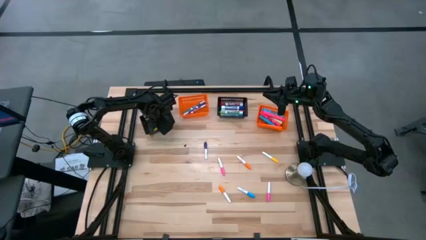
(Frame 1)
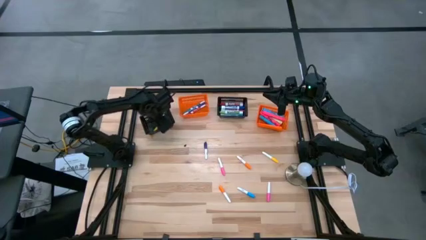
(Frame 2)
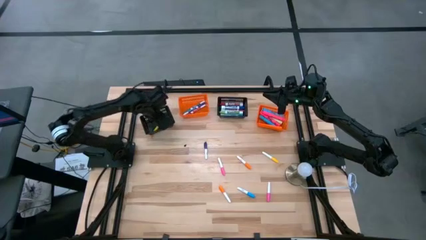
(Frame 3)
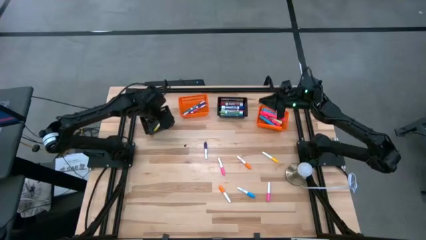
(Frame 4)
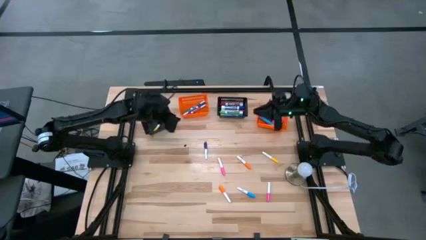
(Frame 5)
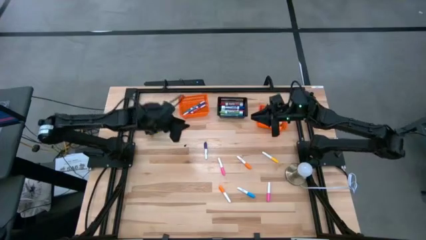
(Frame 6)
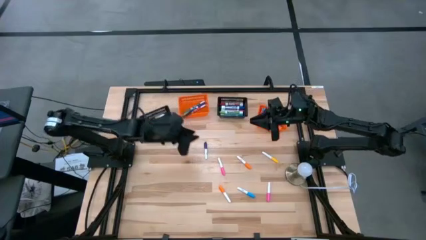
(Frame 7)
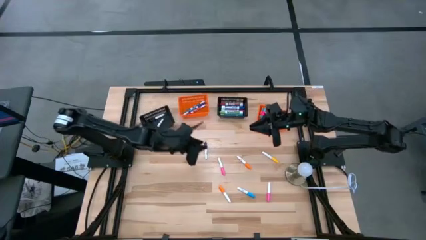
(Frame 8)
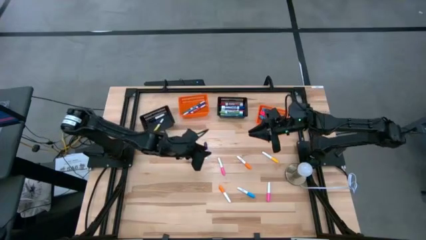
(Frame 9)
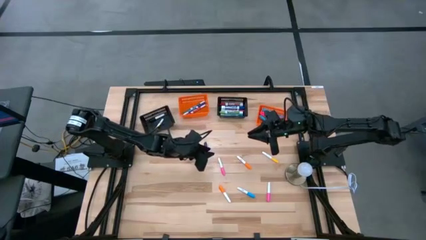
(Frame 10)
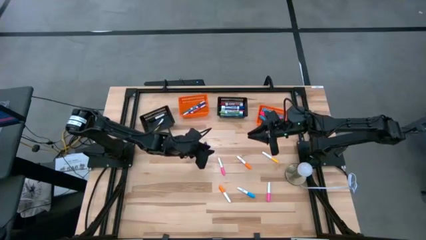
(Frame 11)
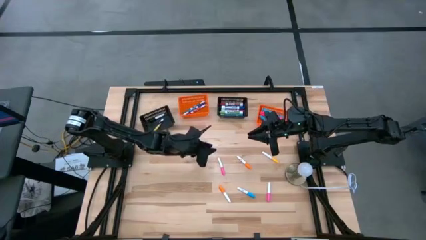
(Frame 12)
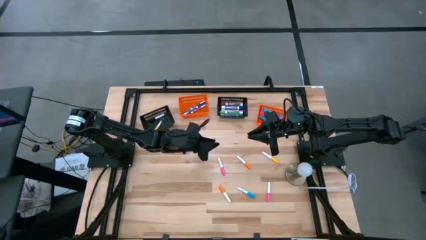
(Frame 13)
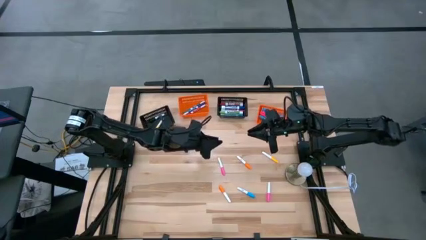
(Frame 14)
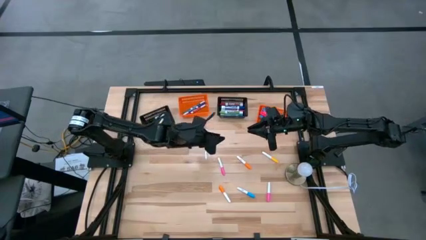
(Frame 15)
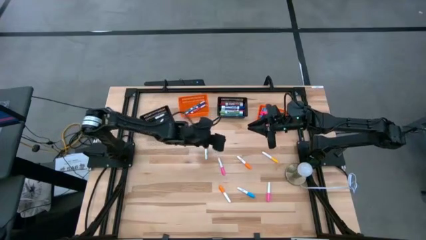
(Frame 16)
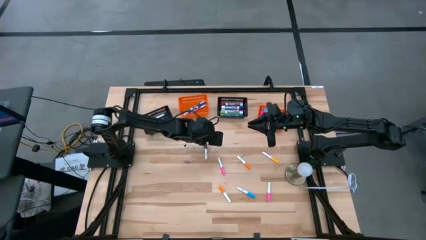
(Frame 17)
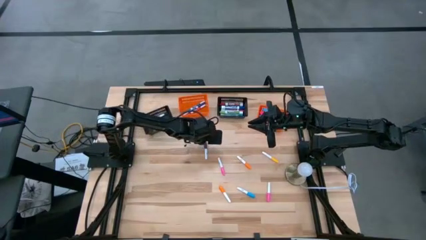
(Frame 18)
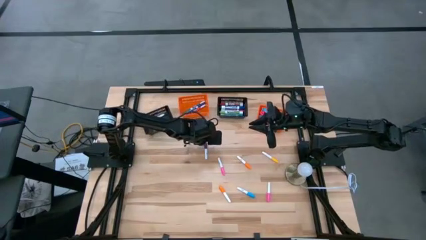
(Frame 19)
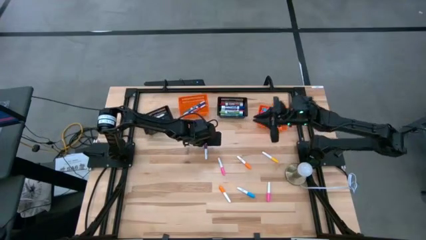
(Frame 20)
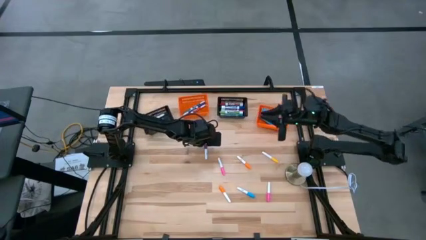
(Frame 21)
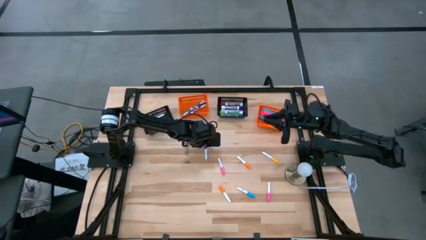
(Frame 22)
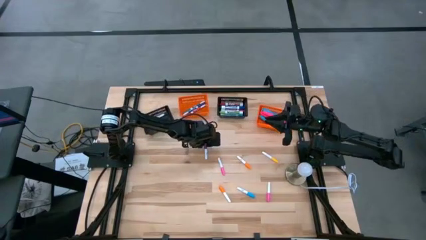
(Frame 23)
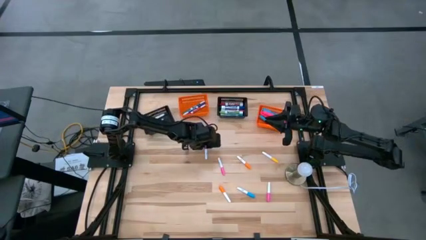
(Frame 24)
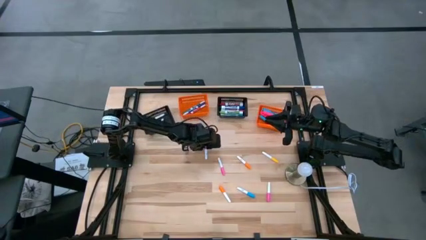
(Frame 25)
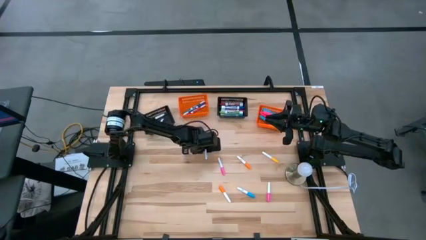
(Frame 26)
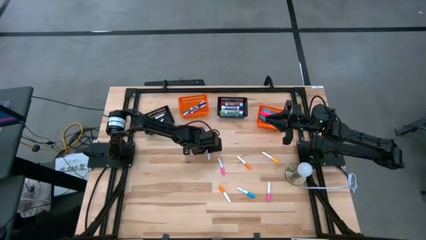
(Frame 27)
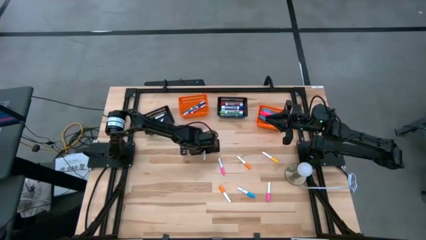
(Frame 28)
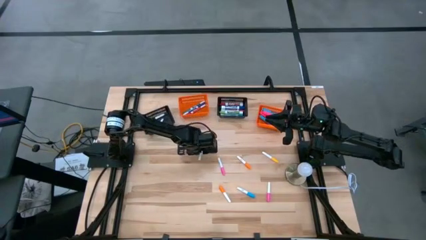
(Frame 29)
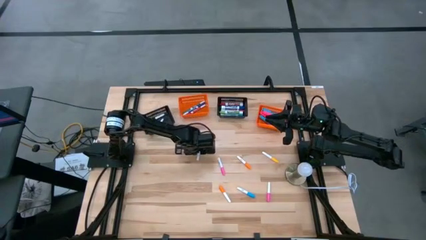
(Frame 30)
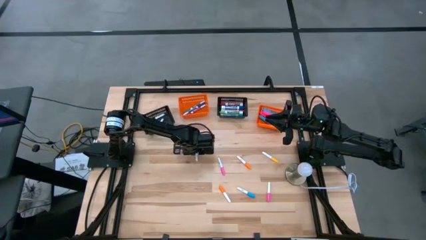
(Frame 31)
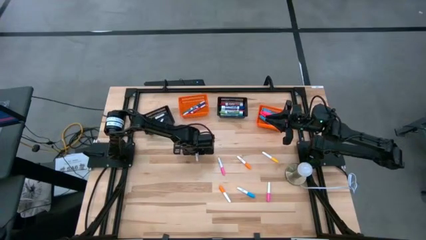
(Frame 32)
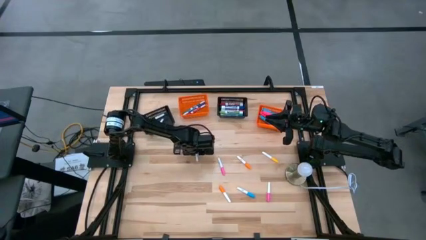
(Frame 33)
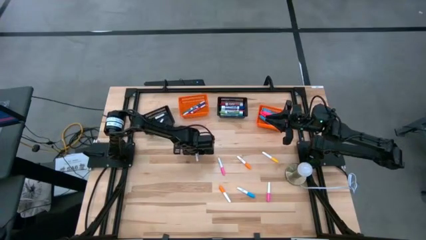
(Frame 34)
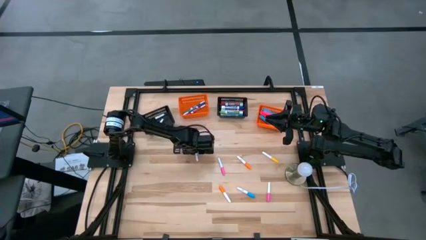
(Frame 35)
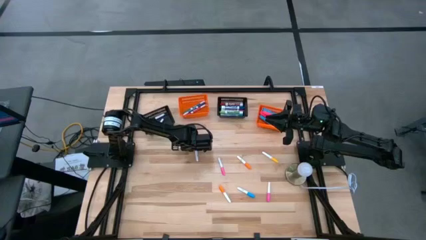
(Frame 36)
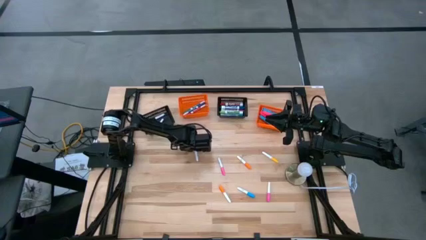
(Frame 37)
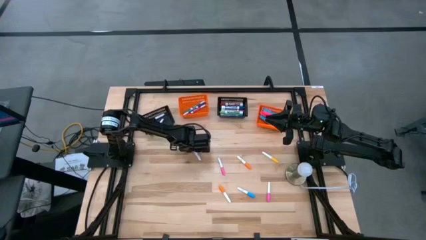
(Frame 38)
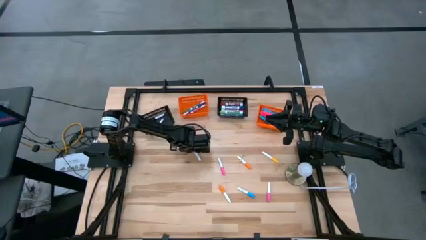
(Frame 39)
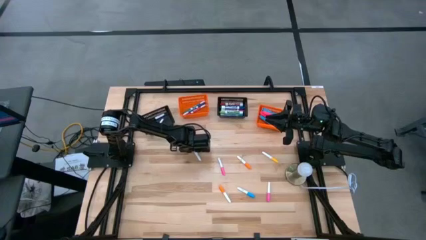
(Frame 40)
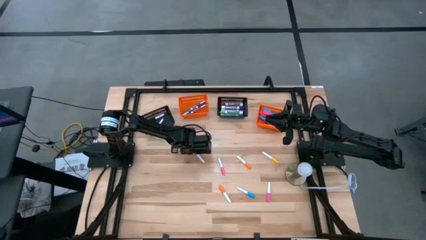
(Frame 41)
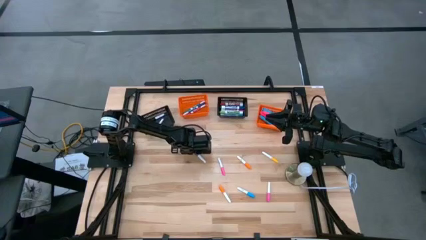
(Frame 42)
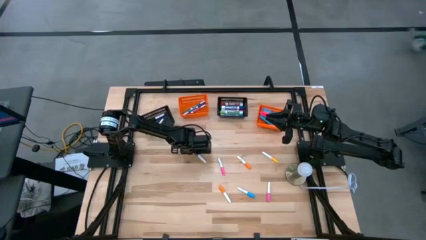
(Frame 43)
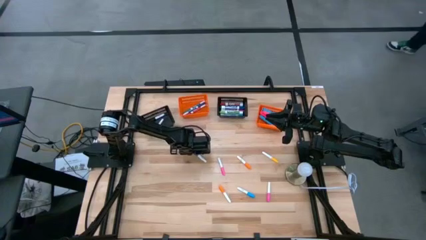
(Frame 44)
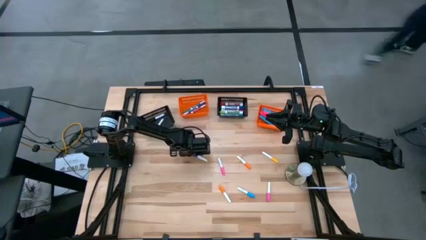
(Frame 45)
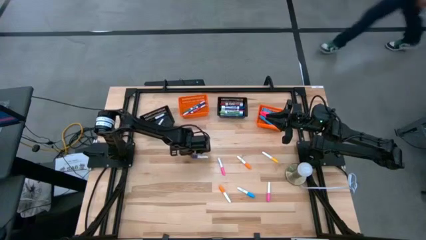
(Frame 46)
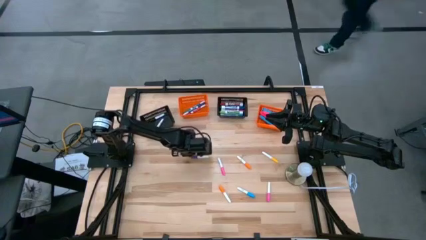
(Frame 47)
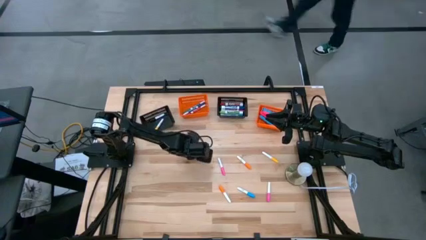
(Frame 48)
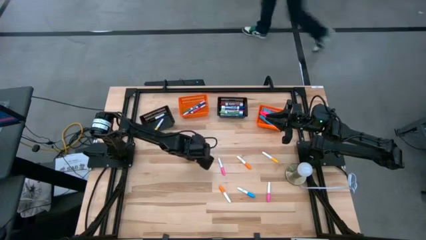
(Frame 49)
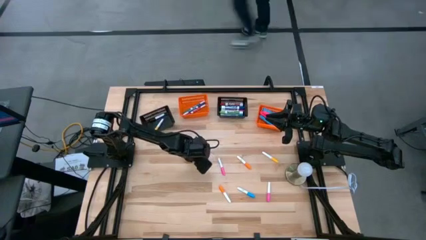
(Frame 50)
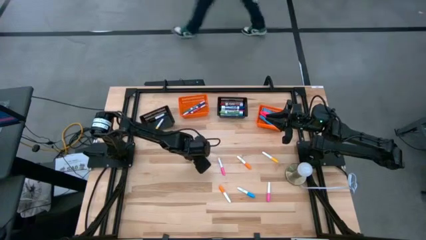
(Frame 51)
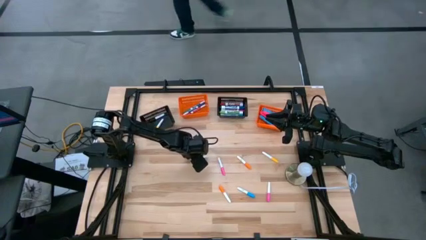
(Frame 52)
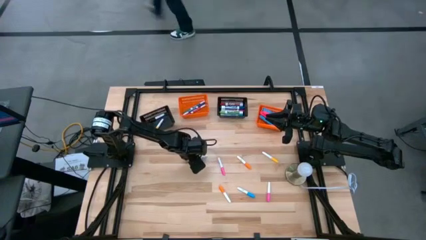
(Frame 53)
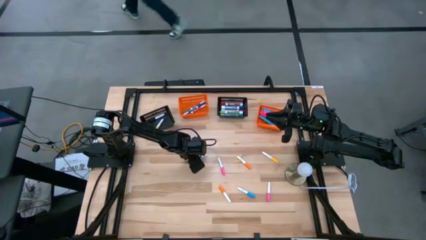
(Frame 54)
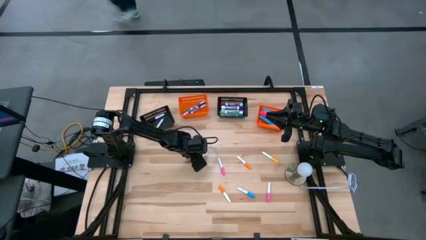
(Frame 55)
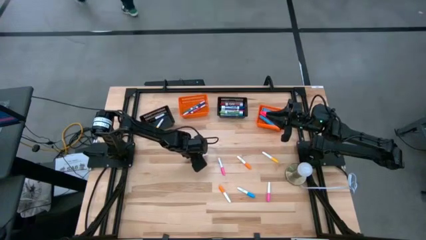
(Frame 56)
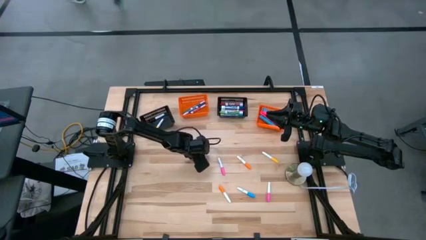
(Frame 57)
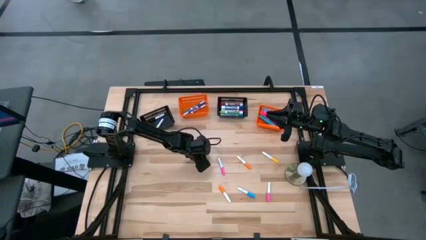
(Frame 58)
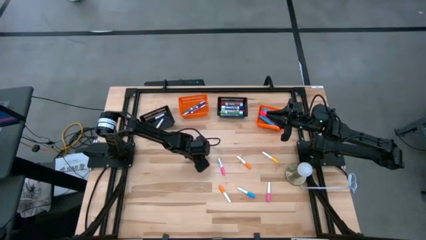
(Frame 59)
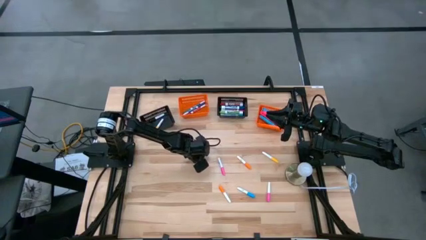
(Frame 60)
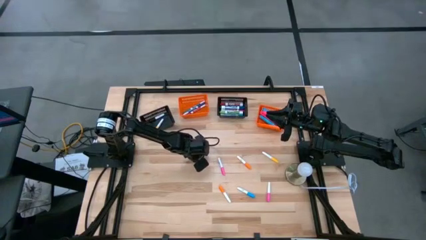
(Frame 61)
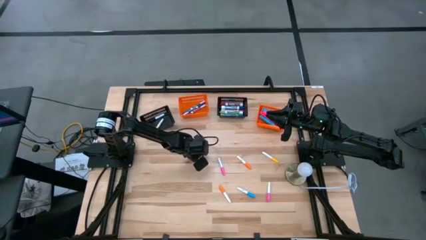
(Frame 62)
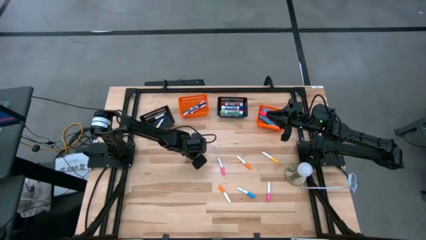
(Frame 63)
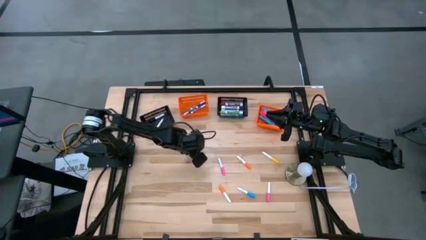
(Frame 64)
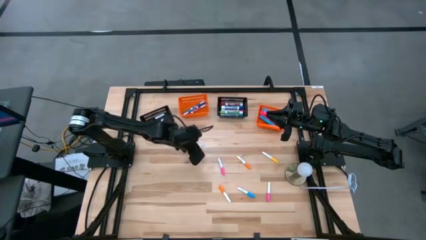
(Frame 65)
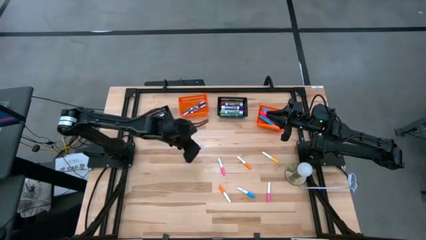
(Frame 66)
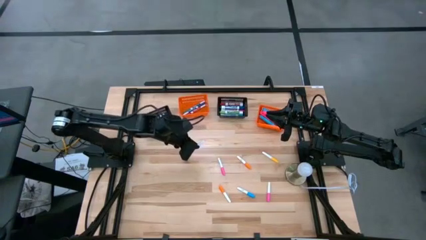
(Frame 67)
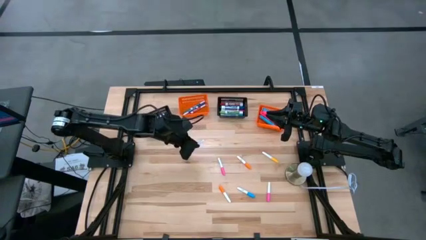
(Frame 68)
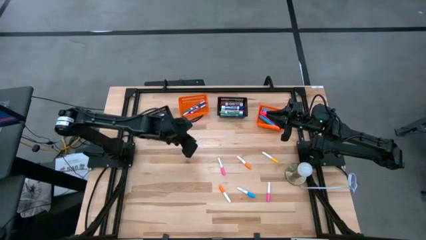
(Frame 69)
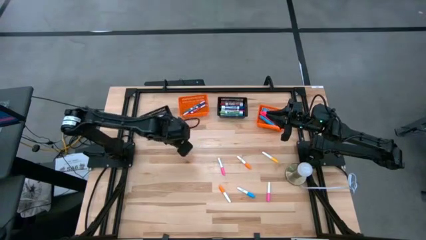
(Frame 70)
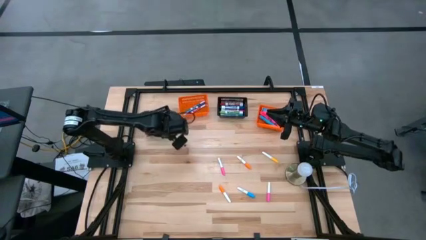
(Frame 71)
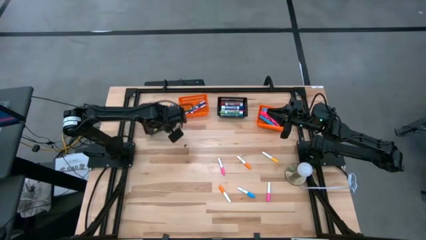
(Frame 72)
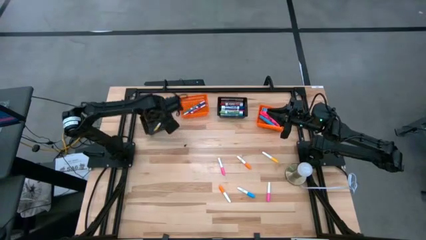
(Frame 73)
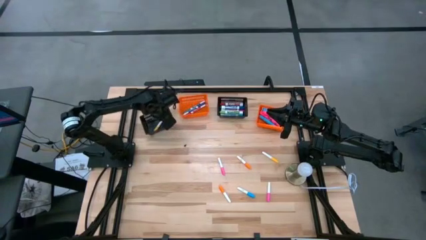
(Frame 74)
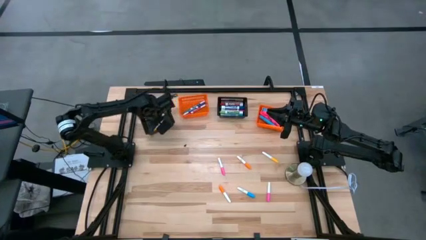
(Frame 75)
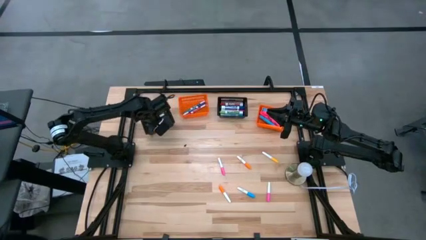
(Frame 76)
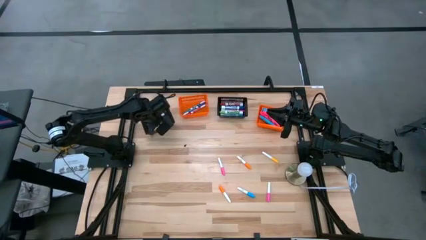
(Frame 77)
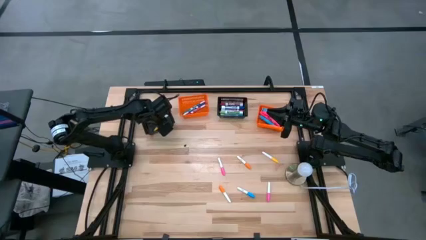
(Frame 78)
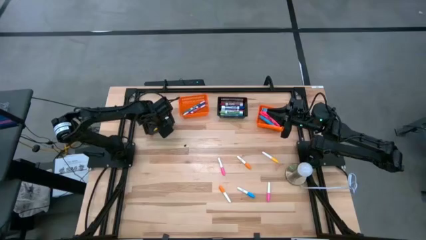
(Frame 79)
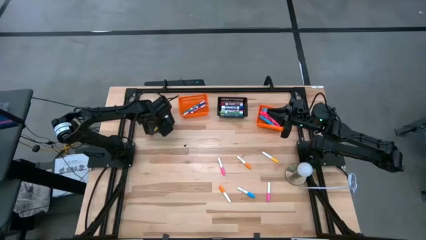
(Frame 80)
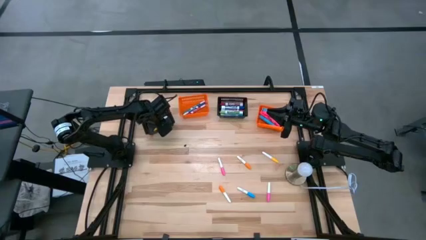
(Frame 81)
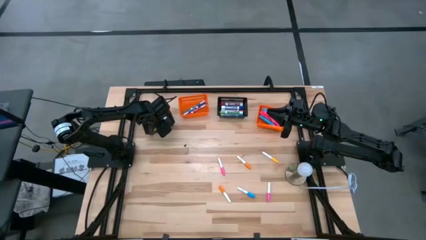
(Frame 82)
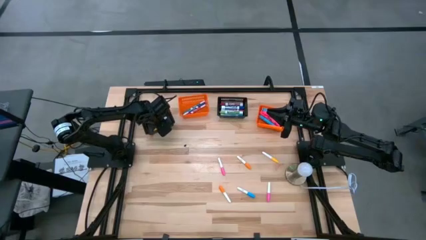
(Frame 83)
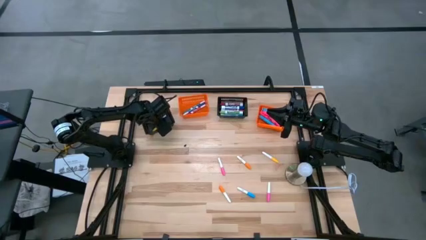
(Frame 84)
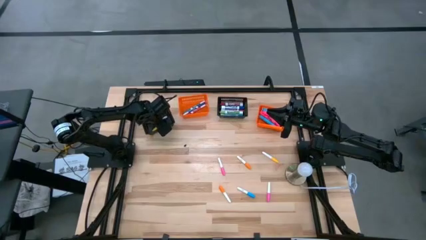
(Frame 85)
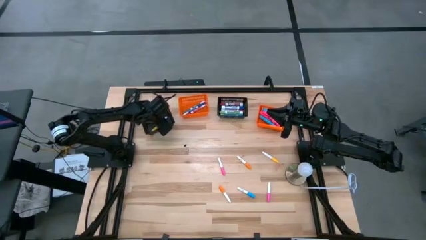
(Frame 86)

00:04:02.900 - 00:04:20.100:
Task: Pick & Place Markers
Put the white purple marker into the left black bin
